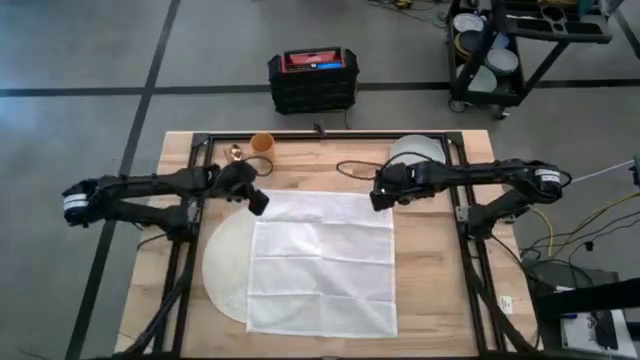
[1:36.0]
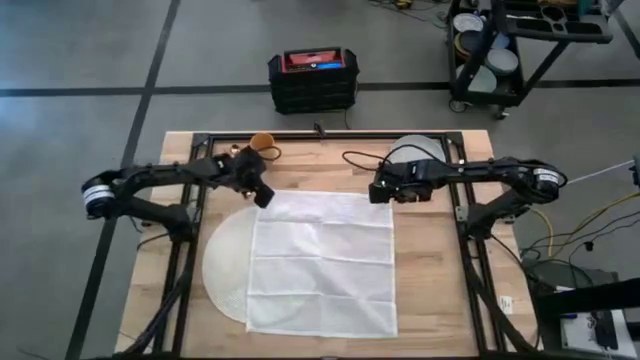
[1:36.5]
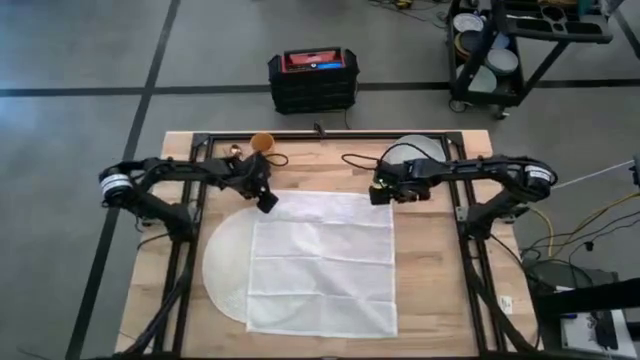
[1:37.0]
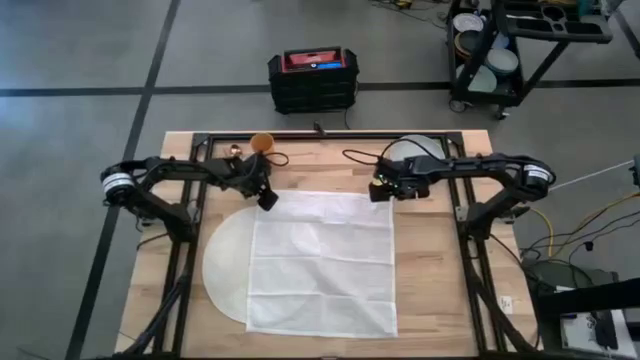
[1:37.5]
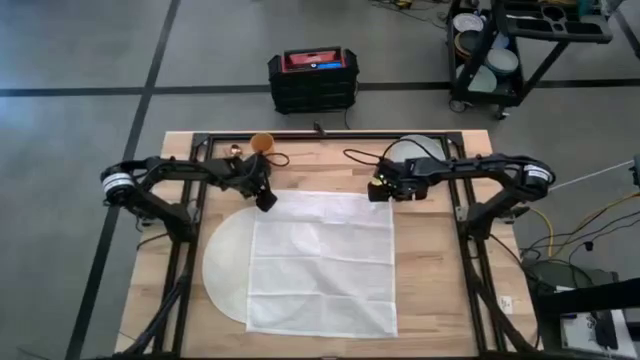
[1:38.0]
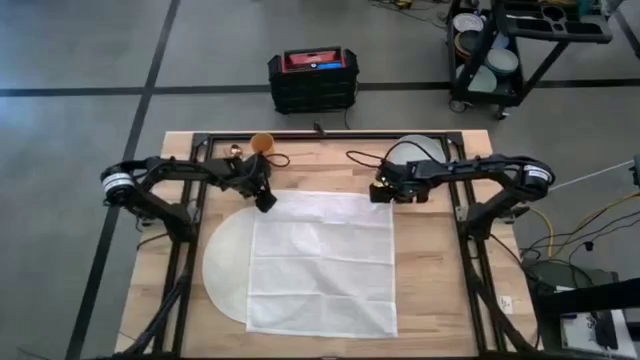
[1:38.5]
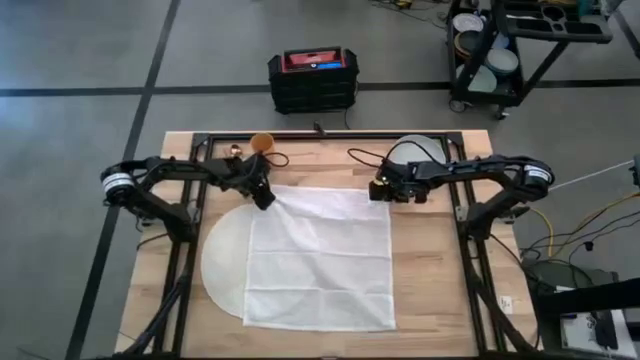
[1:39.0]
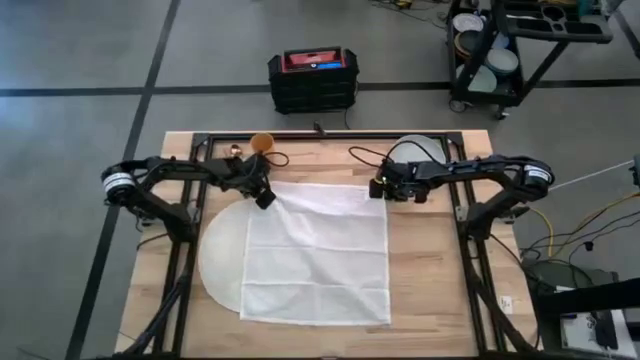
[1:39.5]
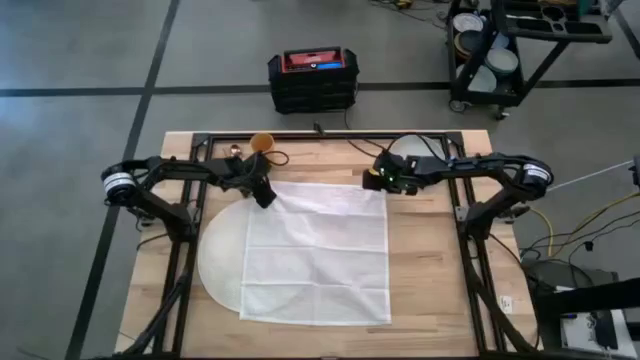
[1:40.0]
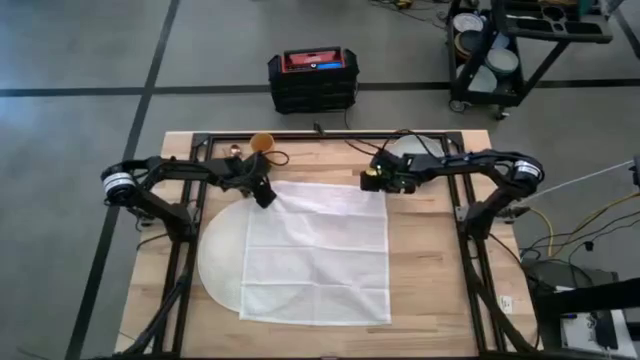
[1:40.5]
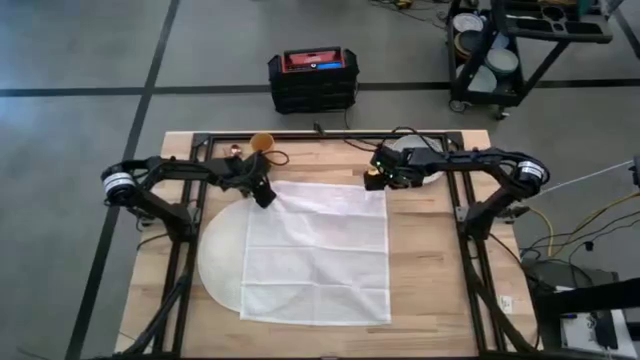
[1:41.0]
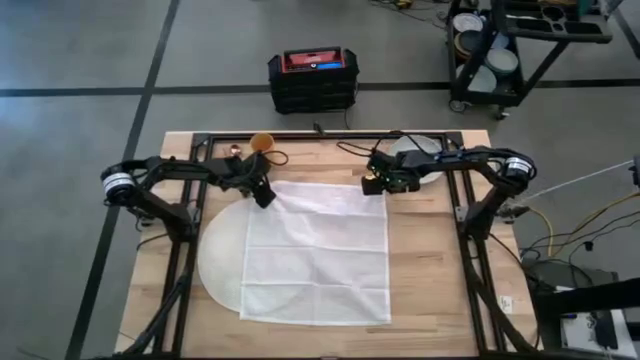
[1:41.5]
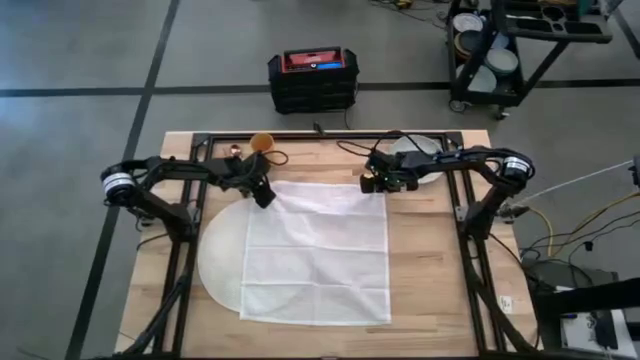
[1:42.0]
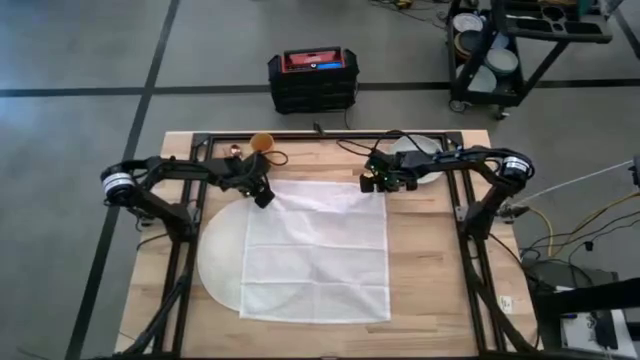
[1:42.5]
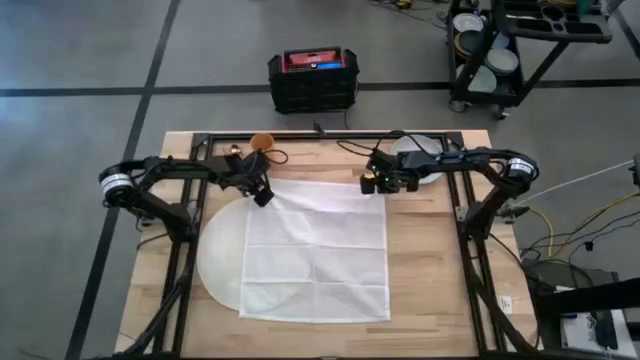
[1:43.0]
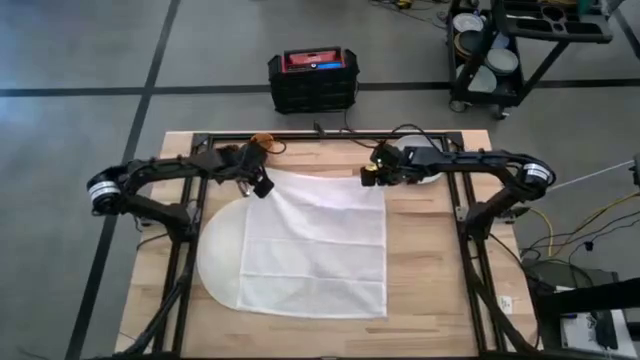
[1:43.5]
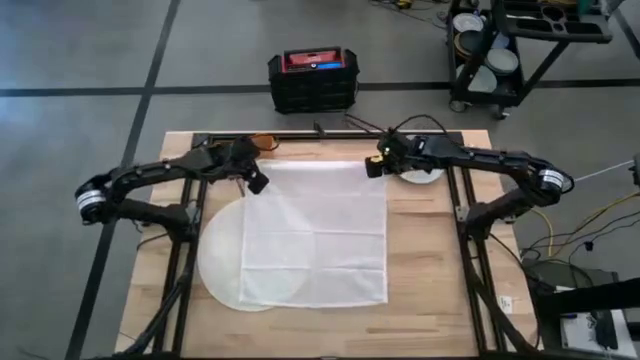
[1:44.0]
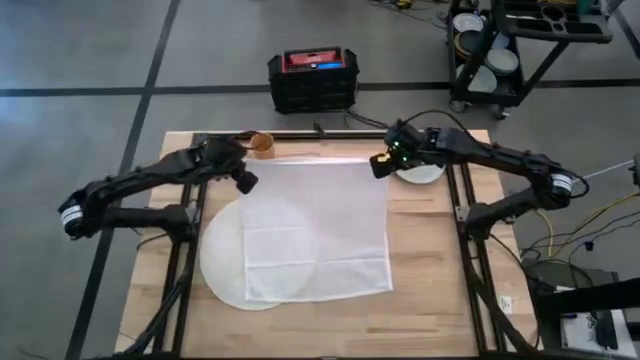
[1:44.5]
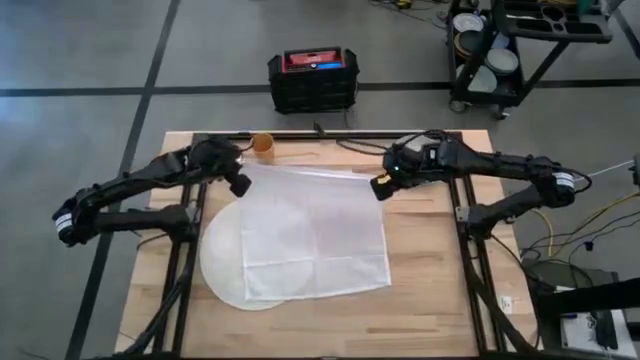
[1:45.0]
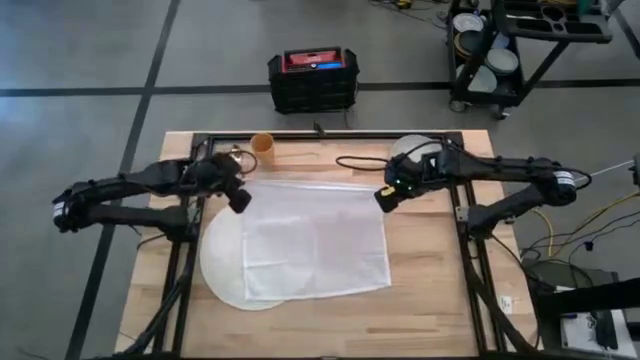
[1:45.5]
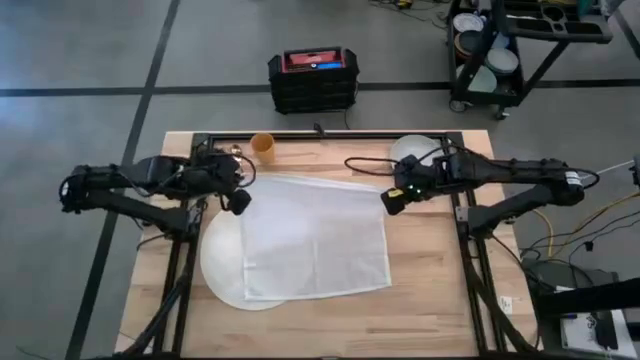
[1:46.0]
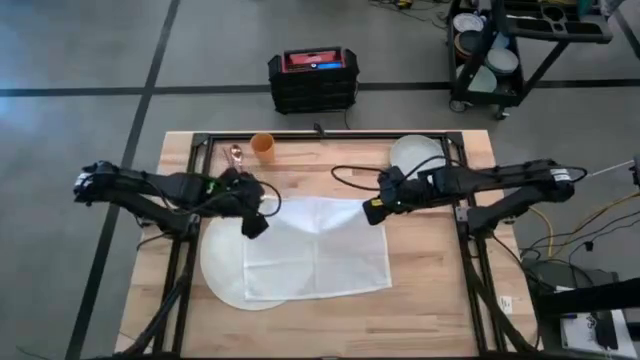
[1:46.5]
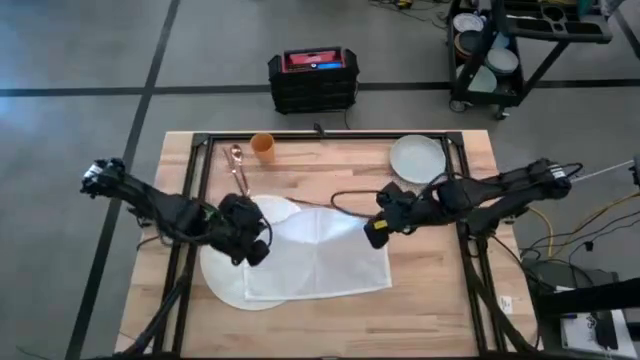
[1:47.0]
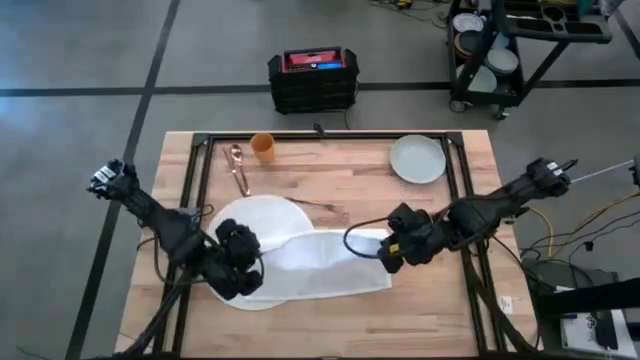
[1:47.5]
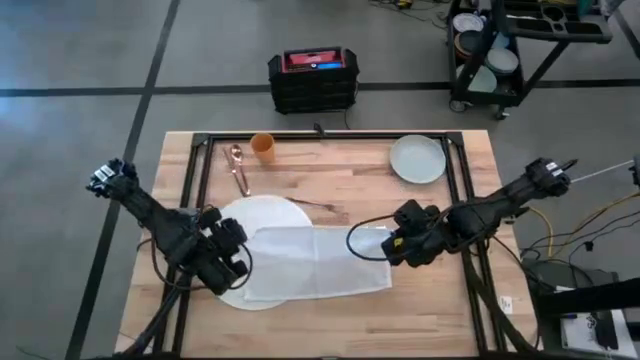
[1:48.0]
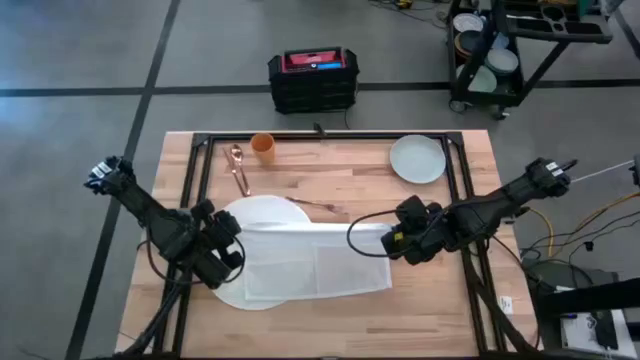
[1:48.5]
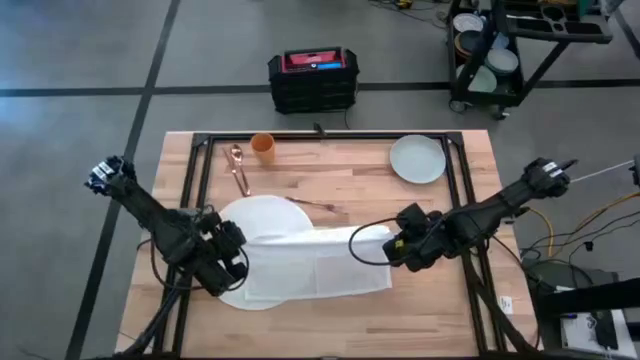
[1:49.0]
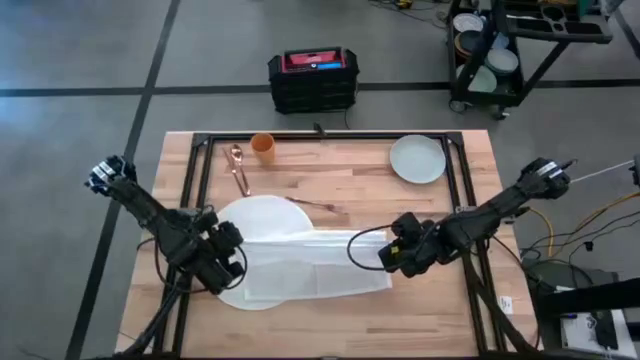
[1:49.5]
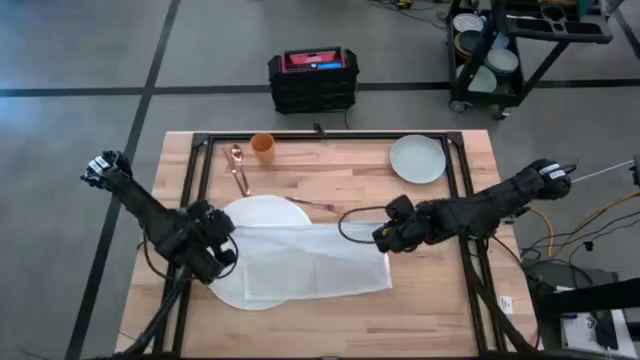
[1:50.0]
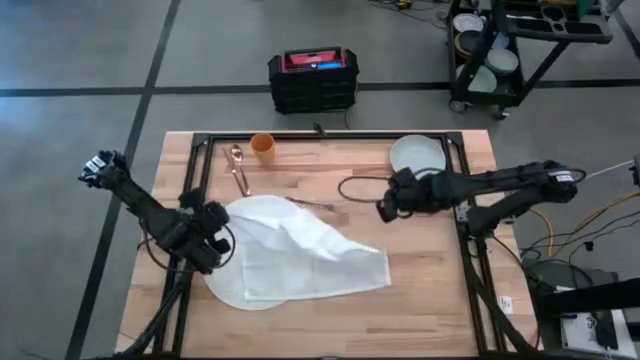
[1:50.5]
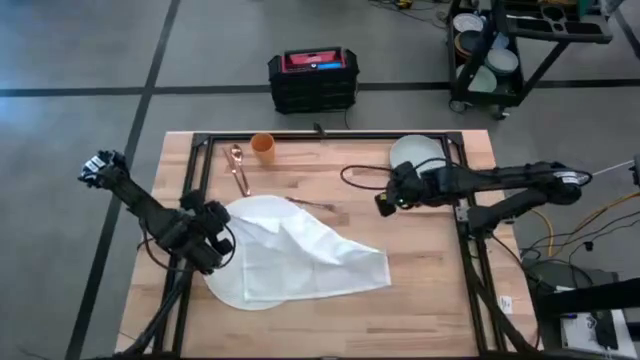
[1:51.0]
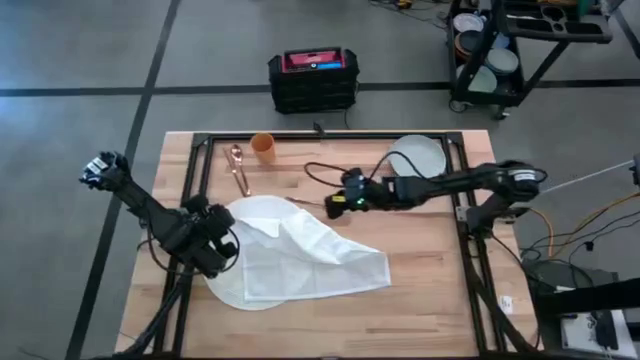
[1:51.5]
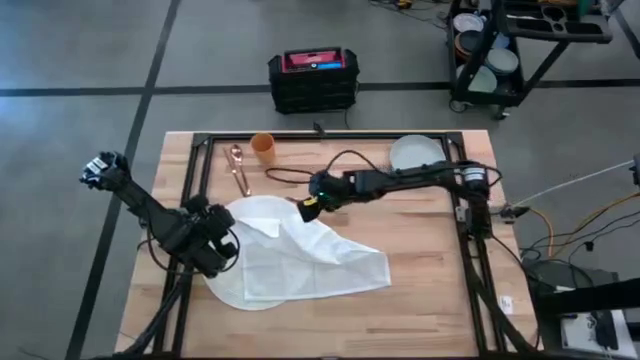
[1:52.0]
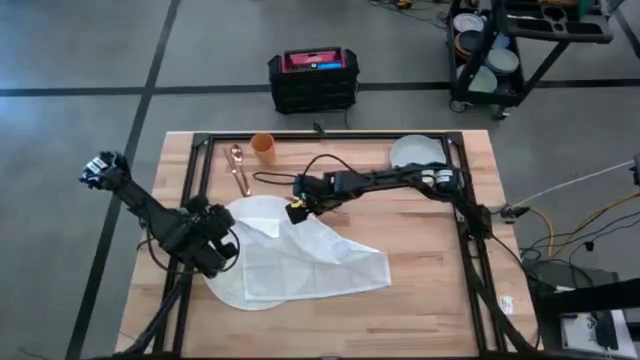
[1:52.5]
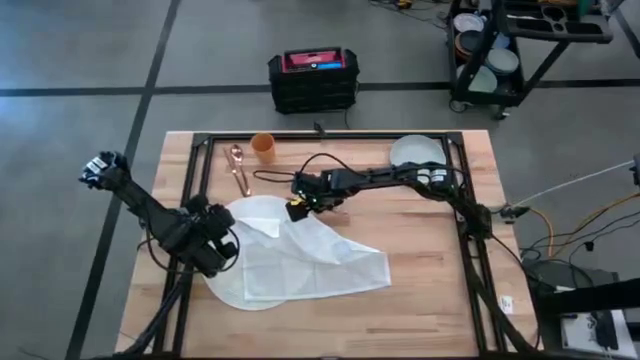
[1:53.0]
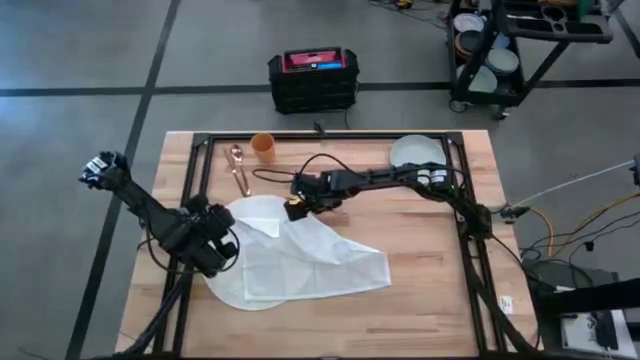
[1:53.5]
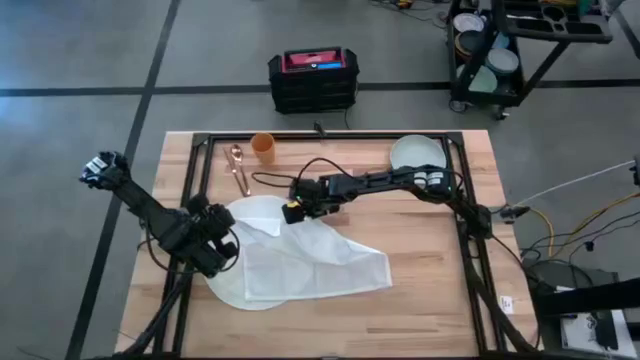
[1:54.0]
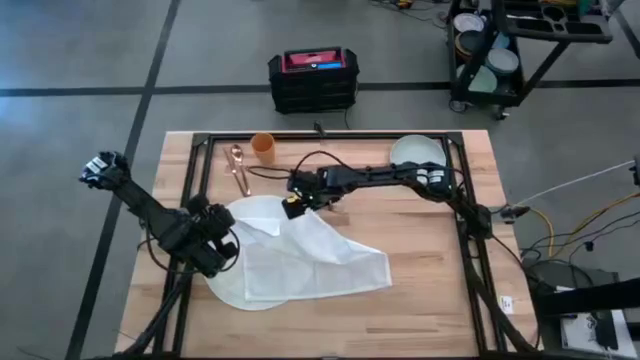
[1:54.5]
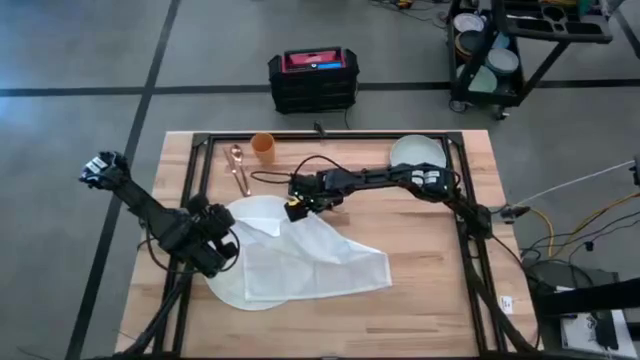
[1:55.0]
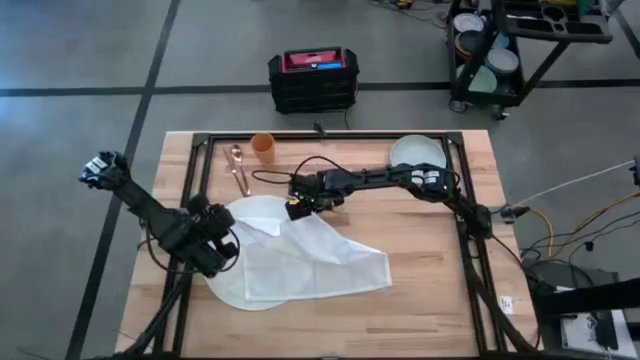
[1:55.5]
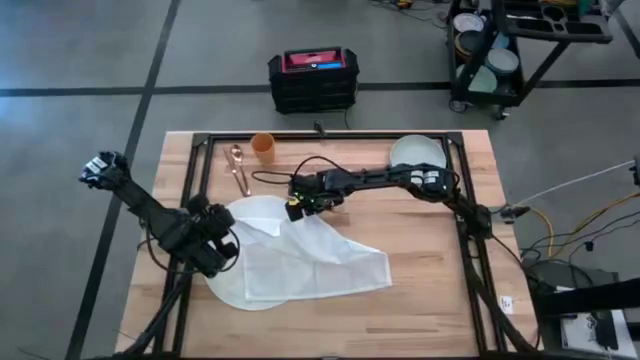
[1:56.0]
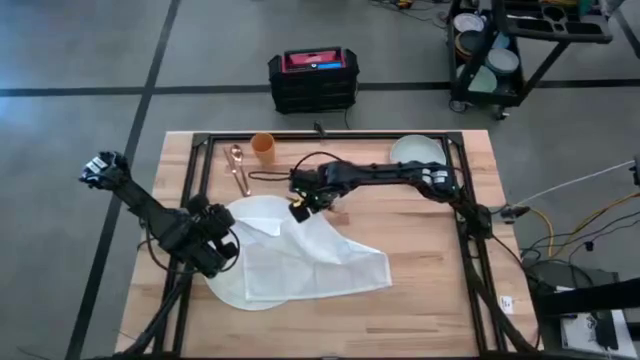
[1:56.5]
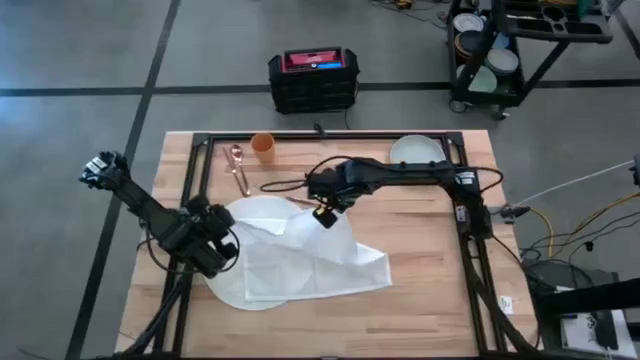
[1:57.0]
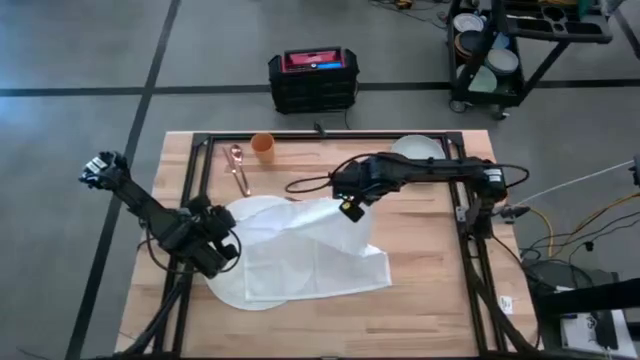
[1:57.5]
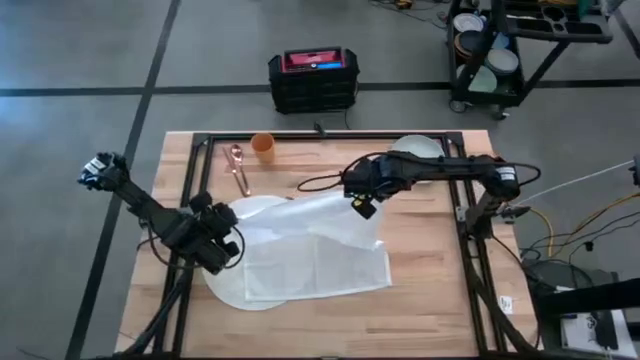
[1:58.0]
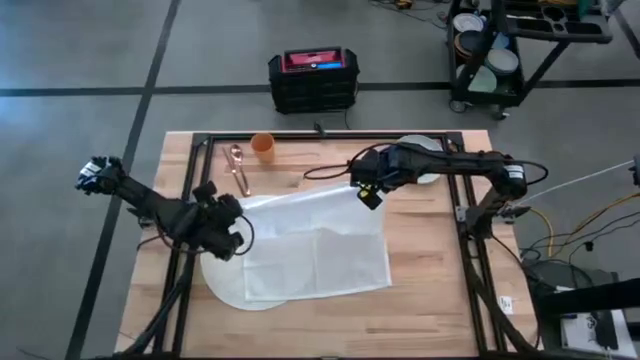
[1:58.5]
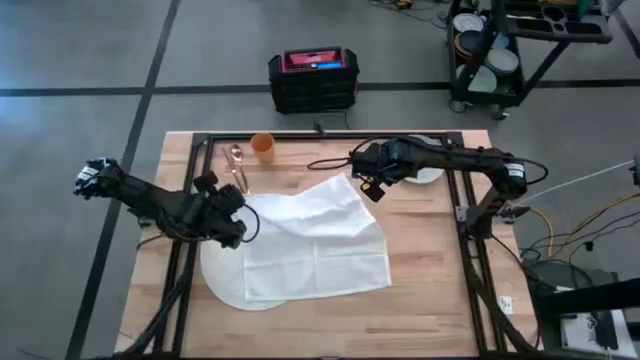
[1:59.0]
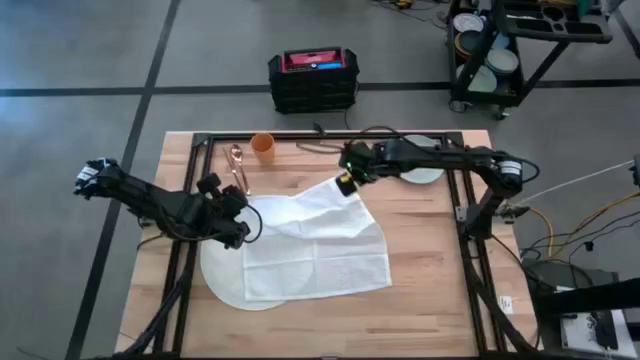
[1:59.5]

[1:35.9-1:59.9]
Task: Set table place
Fold the white napkin
